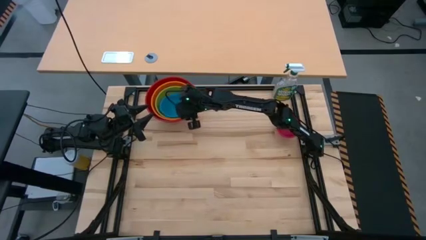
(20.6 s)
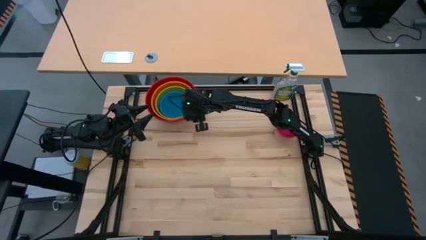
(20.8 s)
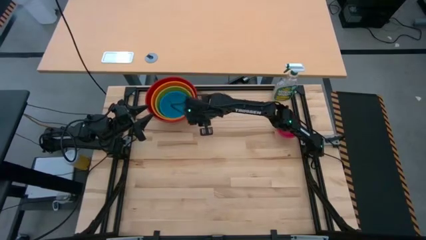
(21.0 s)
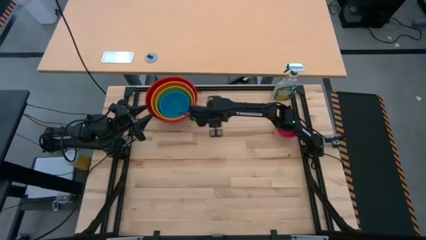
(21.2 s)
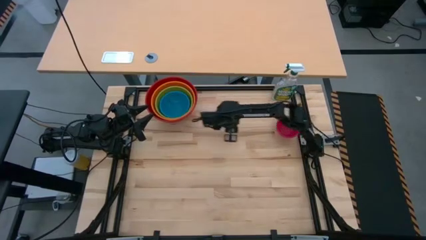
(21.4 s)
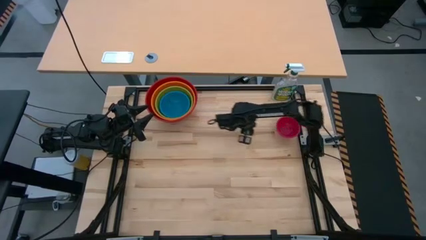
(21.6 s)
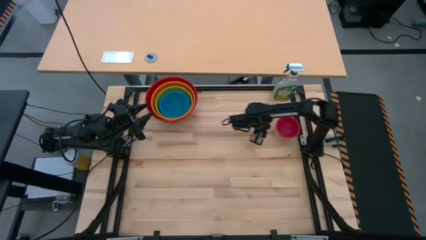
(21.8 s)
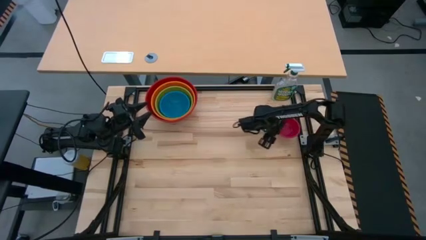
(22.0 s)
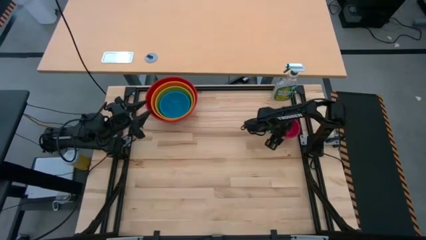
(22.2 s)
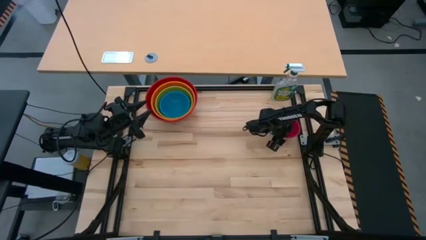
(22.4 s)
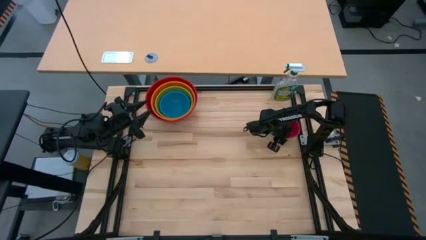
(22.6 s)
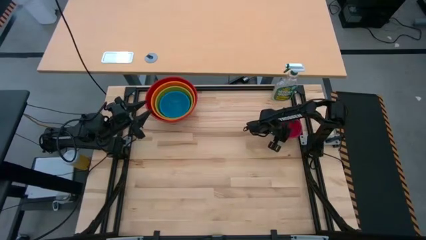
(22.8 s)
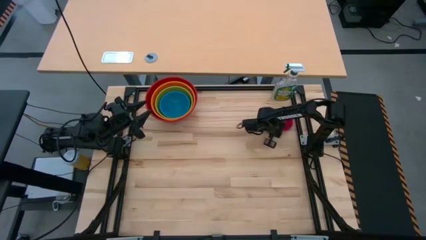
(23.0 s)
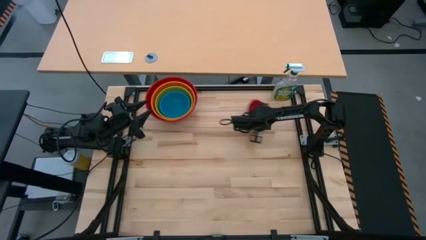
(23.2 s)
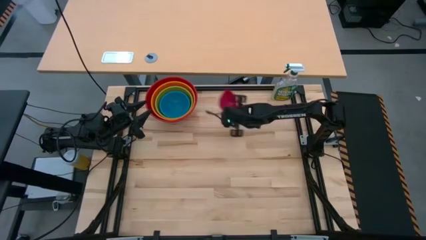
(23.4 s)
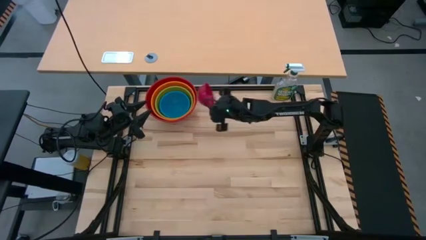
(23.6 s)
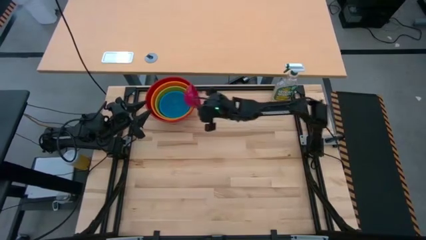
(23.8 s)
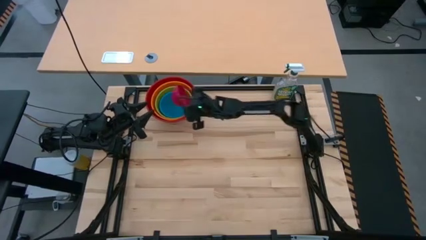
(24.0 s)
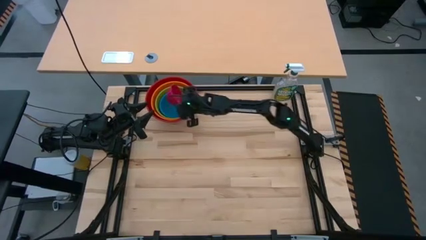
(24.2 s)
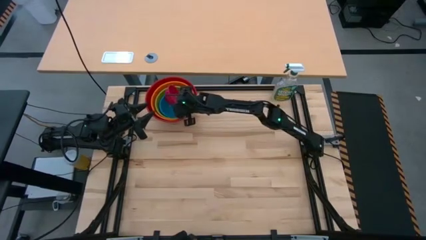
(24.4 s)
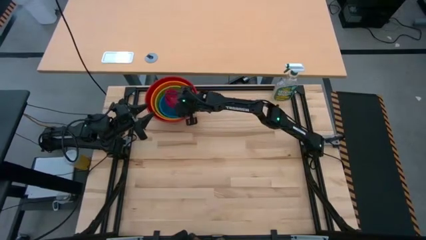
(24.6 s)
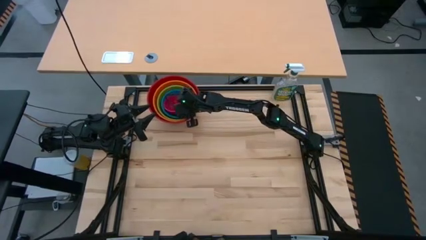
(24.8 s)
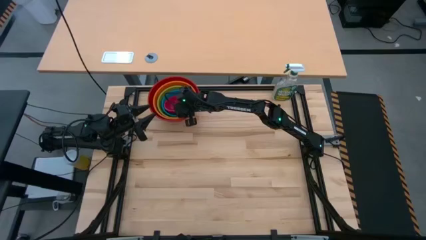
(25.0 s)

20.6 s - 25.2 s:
Stack the pink bowl on top of the blue bowl

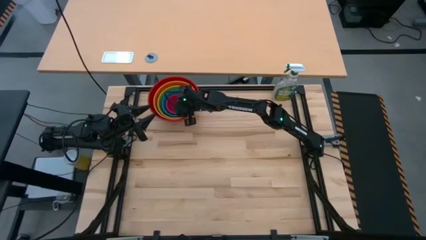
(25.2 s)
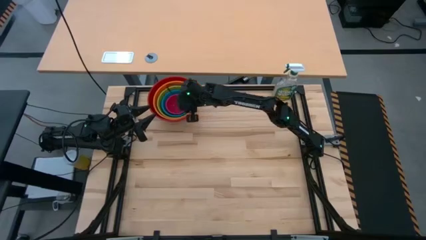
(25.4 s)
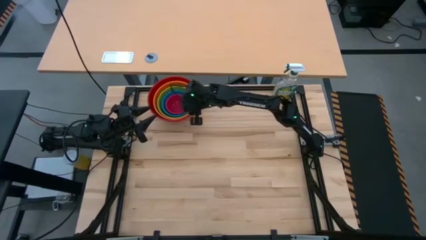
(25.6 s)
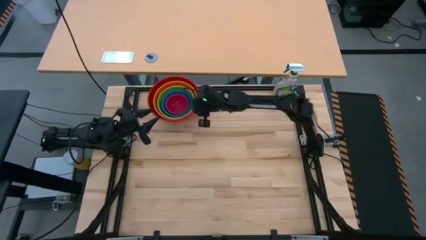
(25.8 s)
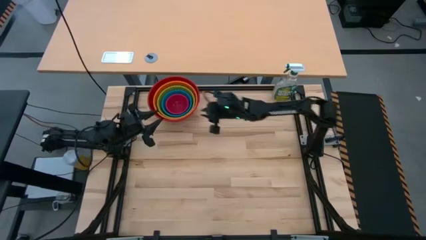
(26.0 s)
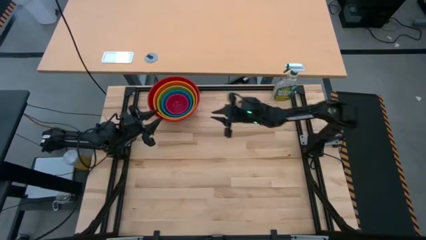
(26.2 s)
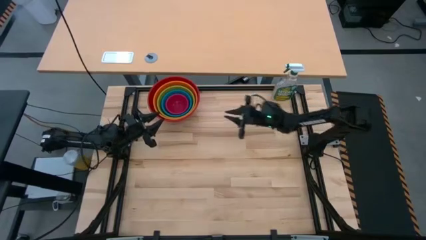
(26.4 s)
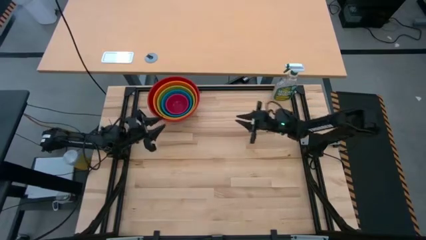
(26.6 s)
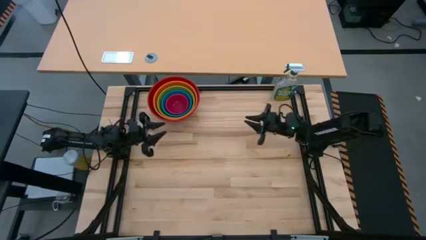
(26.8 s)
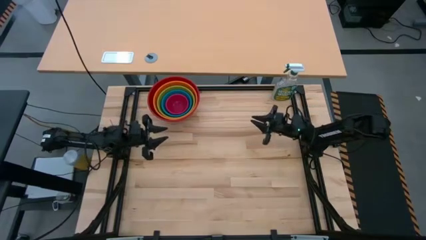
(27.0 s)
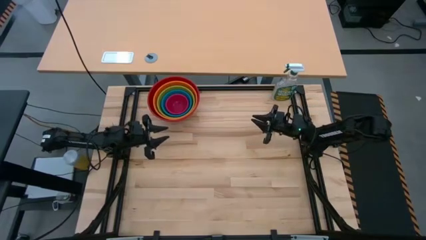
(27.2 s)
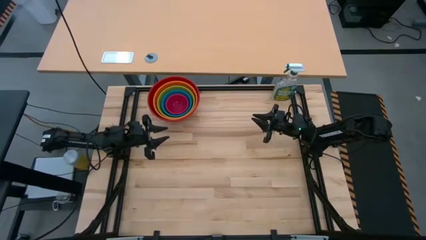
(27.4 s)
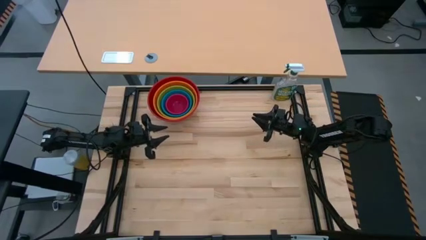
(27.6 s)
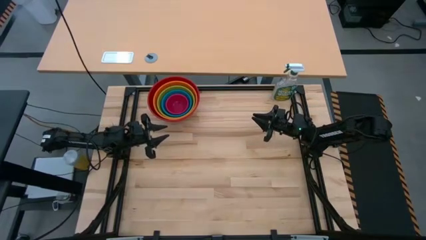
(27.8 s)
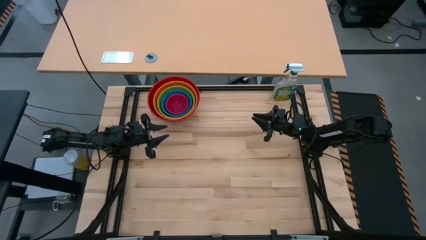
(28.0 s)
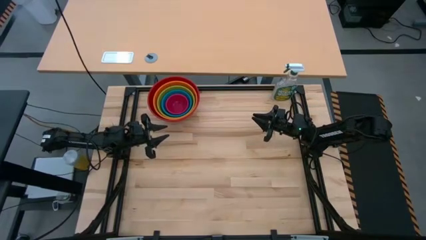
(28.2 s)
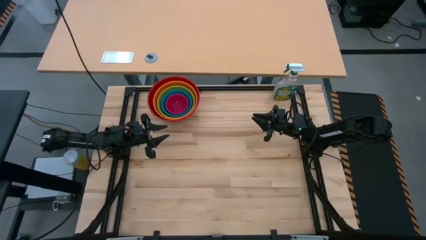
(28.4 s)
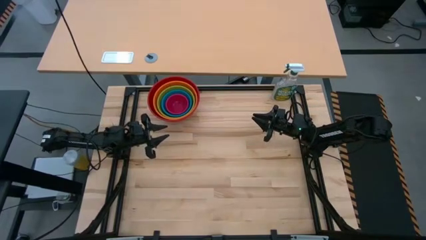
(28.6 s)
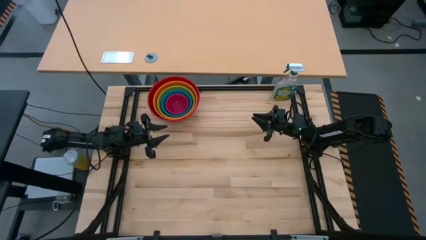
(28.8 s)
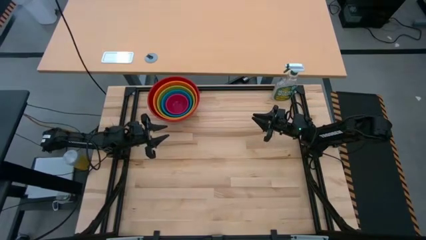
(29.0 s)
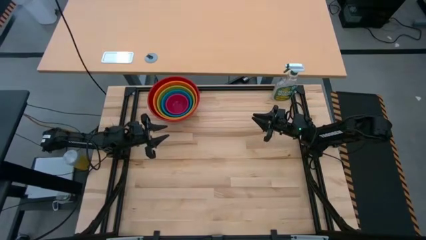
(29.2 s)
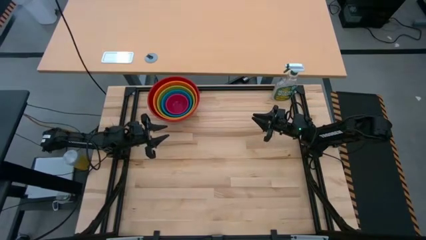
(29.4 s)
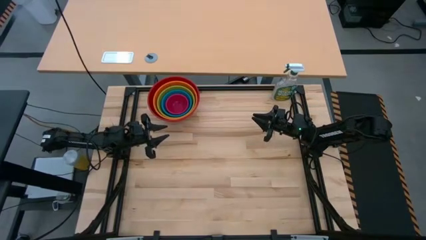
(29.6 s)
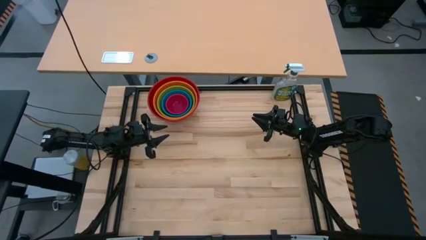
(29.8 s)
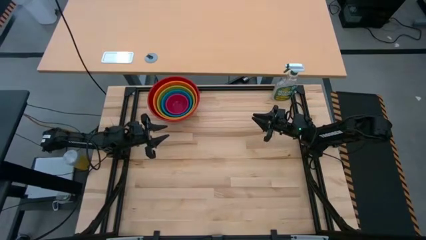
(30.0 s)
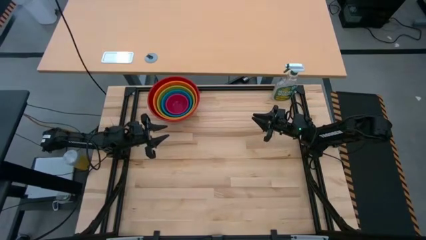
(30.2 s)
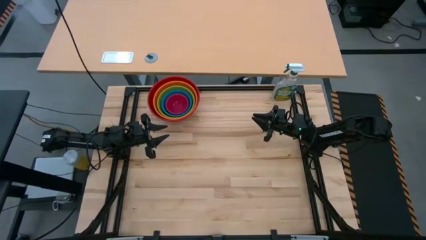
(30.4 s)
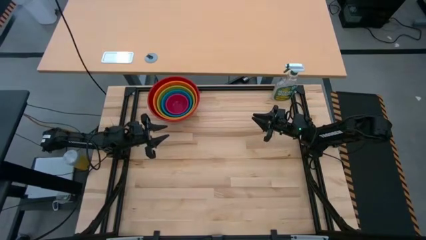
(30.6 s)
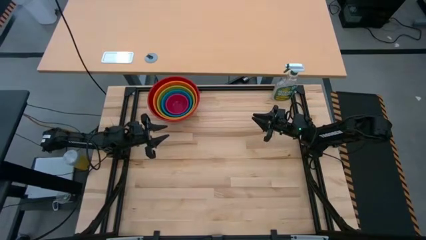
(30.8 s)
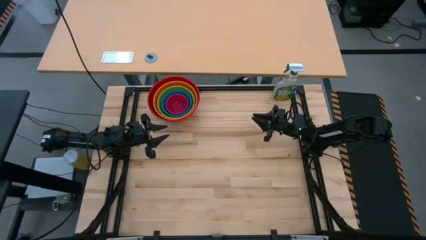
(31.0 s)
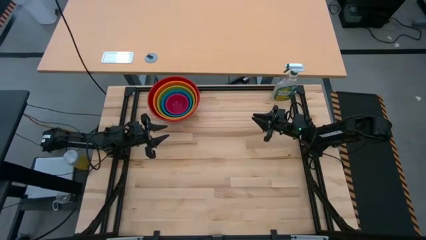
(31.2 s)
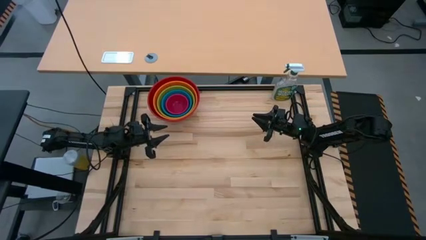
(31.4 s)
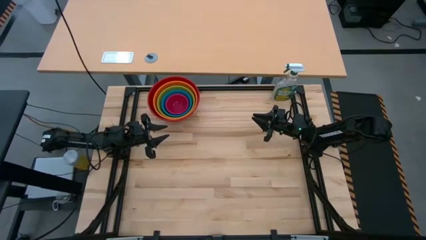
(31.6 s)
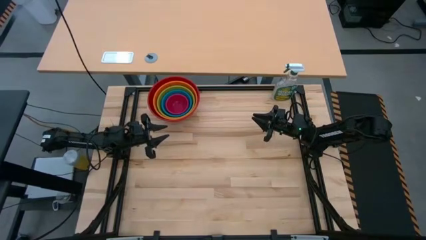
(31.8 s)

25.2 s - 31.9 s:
Return to Home Position
